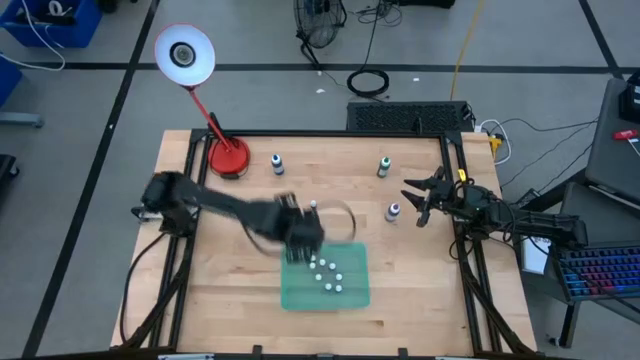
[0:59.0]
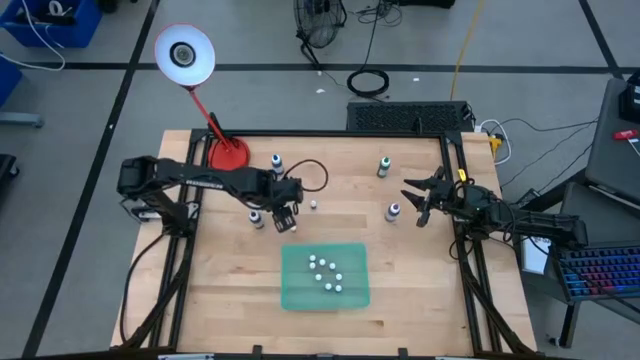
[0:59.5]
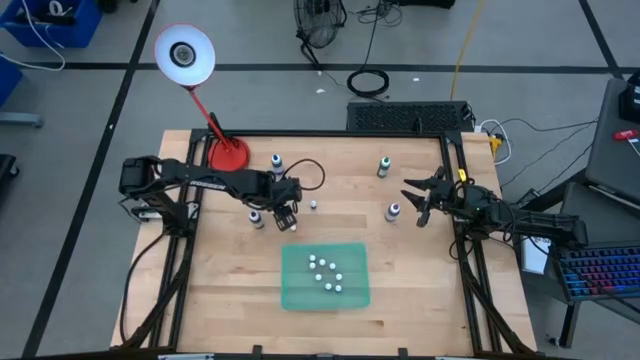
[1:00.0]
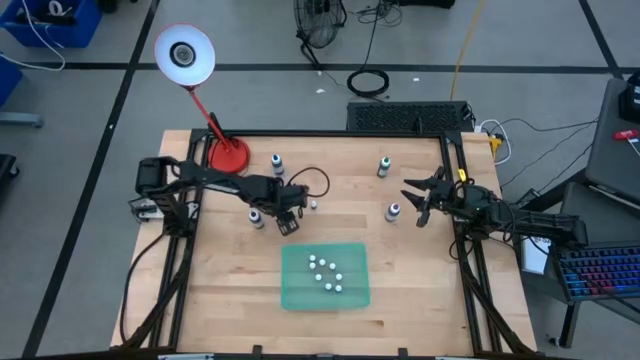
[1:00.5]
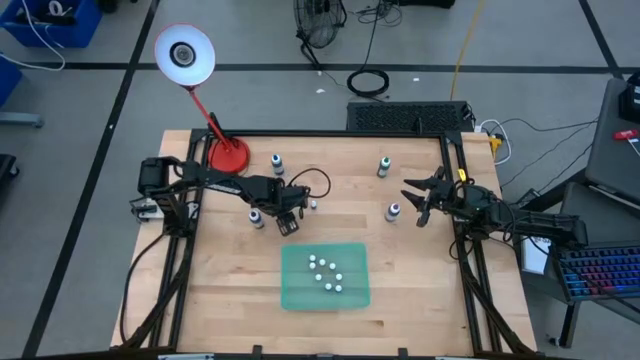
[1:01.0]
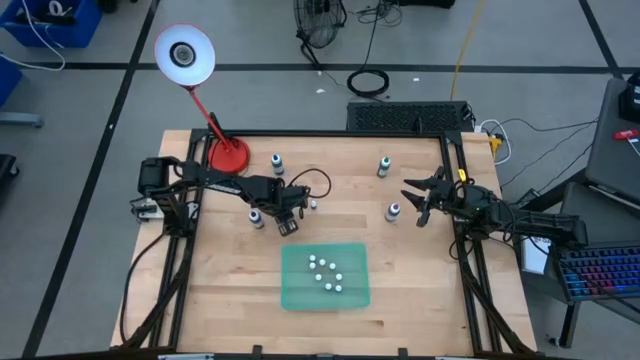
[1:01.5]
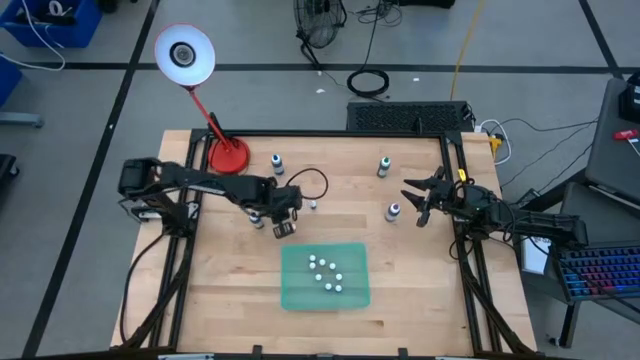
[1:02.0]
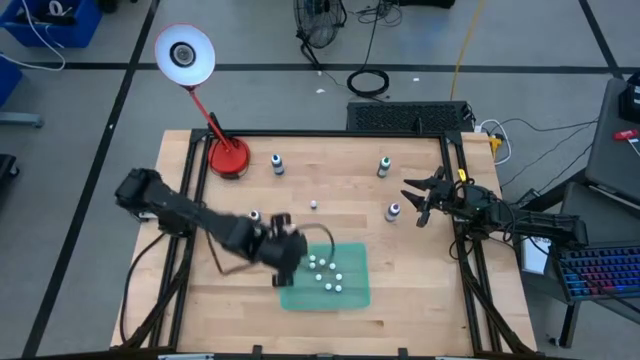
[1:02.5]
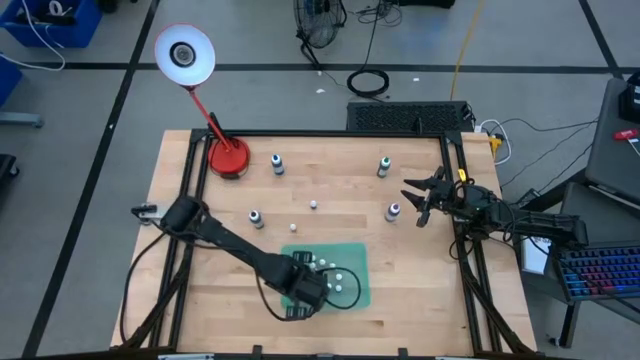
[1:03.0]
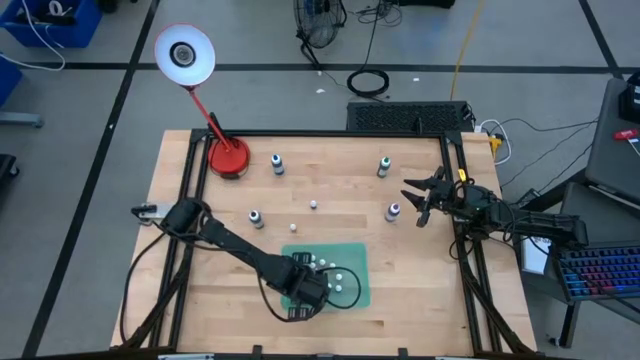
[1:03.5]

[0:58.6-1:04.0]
Task: Pick & Place food coloring
Put the small black food coloring bottle into the blue bin

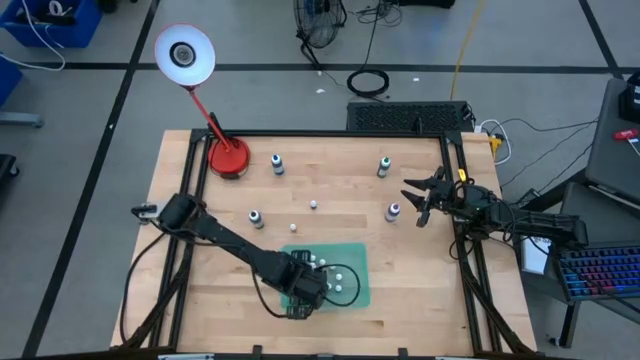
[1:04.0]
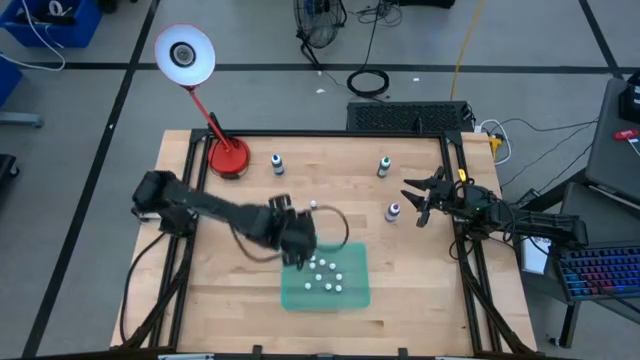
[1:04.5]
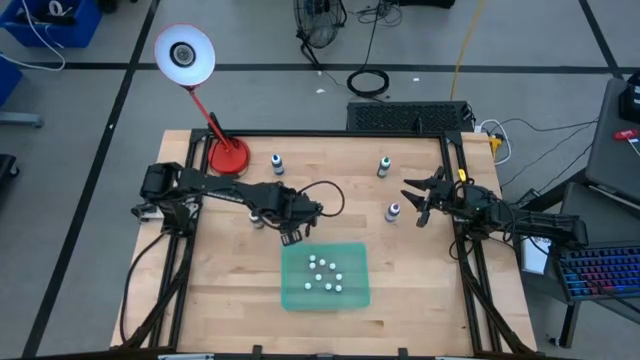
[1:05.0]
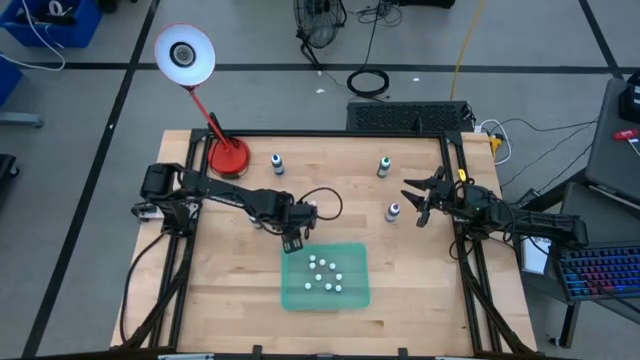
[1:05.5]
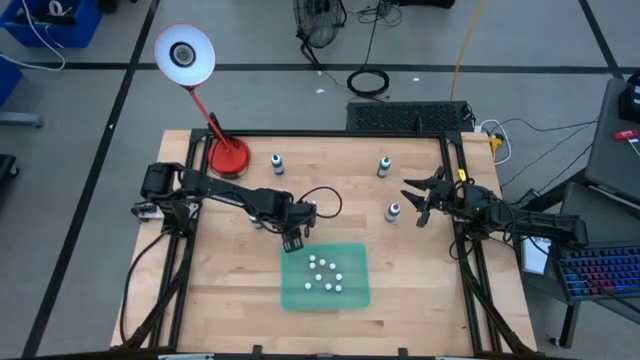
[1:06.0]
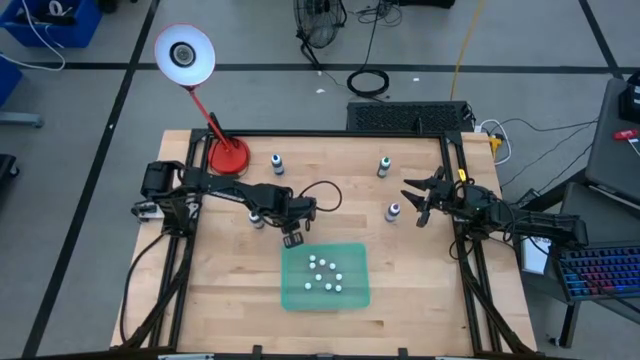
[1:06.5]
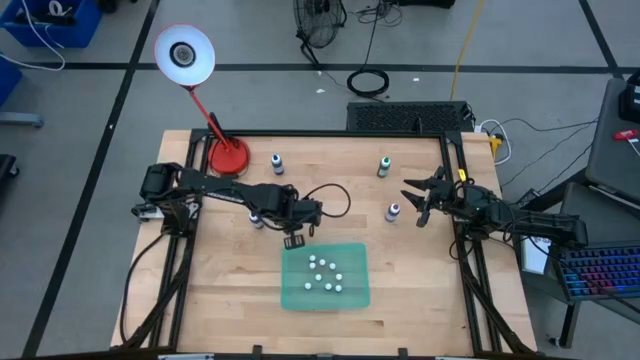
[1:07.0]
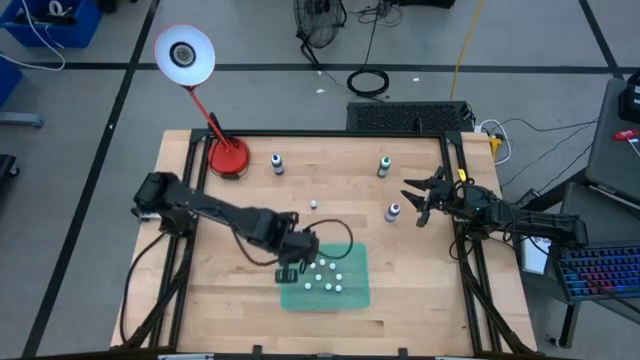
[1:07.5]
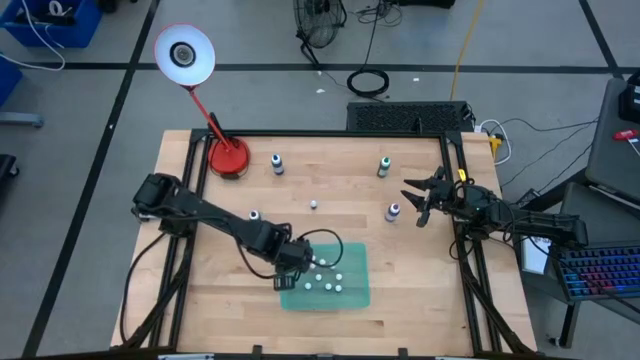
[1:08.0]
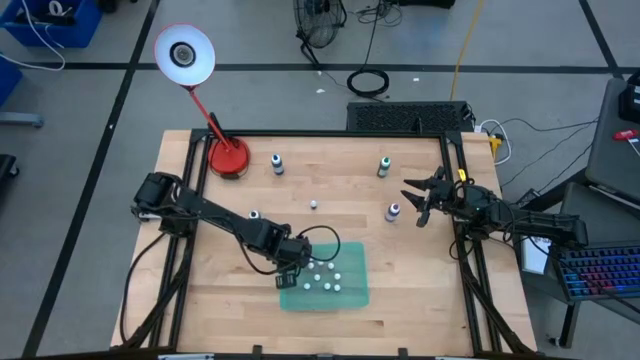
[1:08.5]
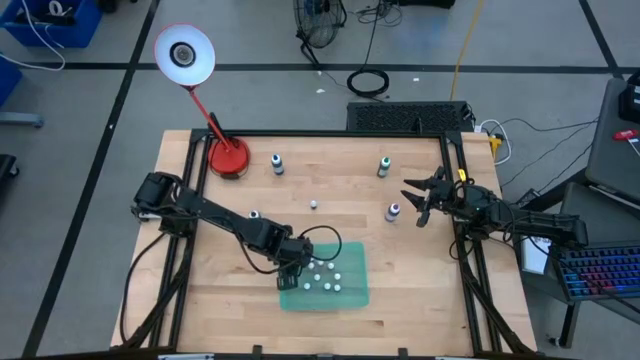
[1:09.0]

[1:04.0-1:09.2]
Put the small yellow food coloring bottle into the blue bin

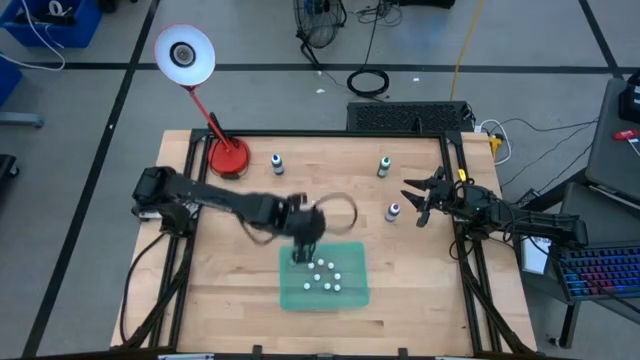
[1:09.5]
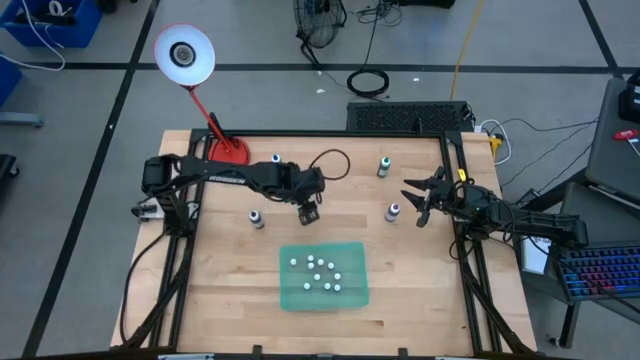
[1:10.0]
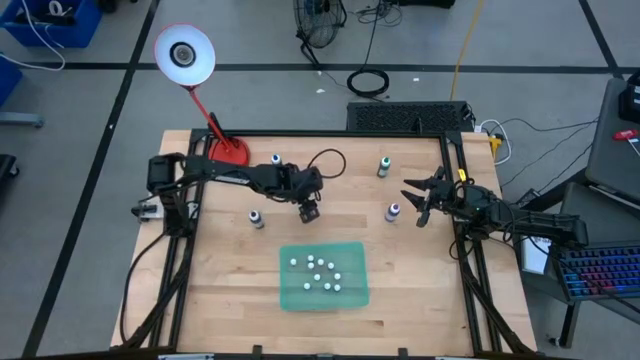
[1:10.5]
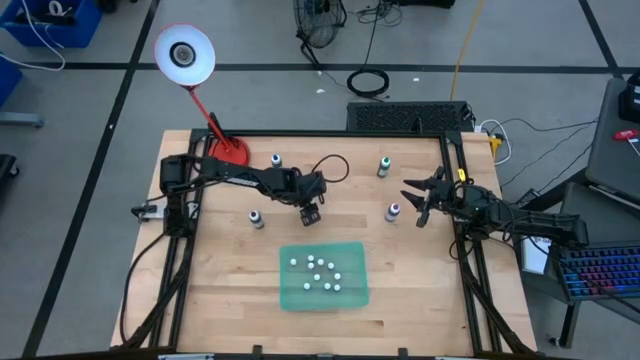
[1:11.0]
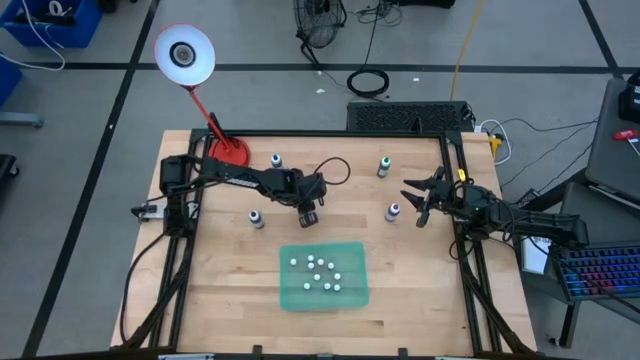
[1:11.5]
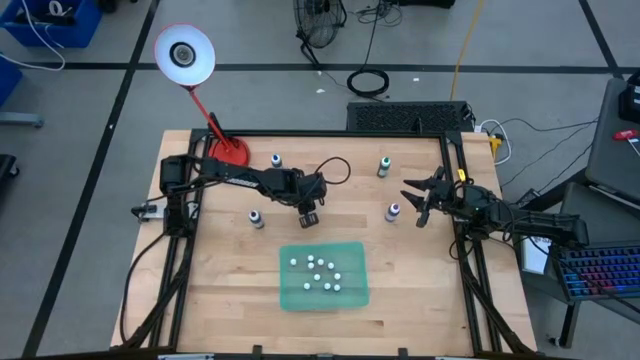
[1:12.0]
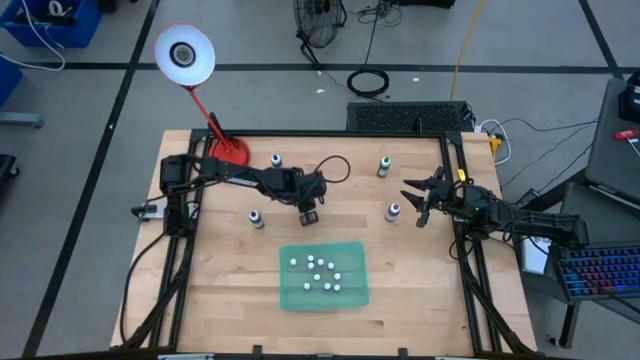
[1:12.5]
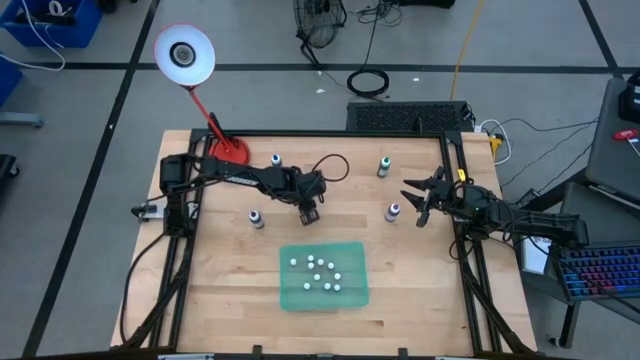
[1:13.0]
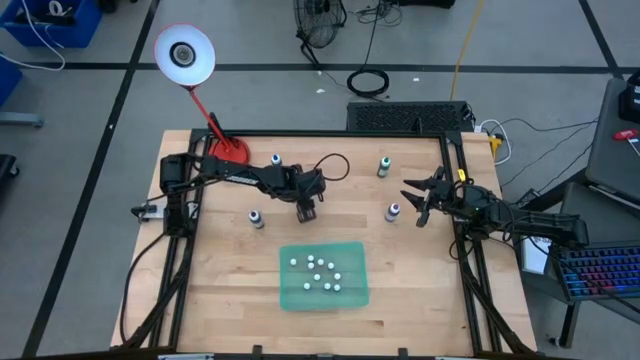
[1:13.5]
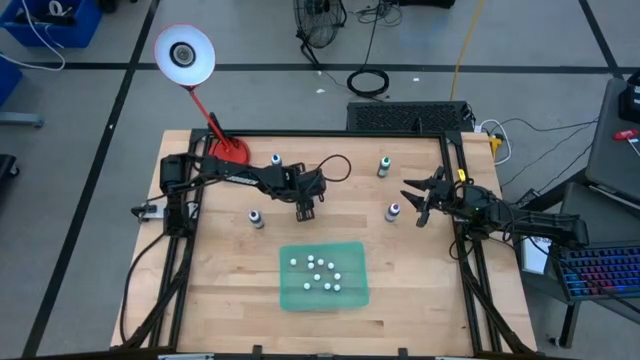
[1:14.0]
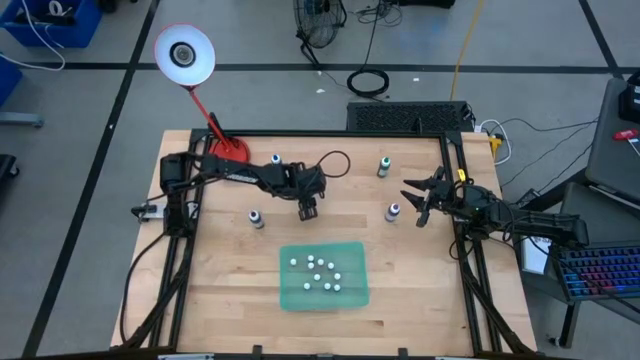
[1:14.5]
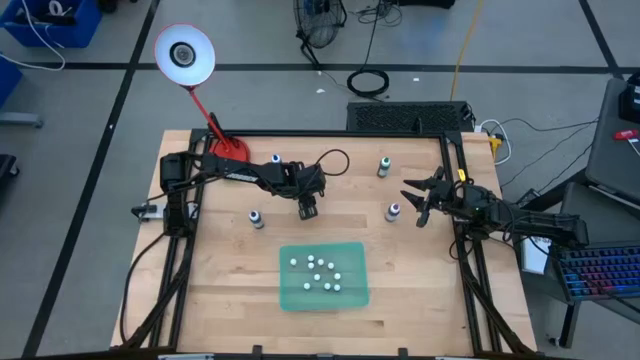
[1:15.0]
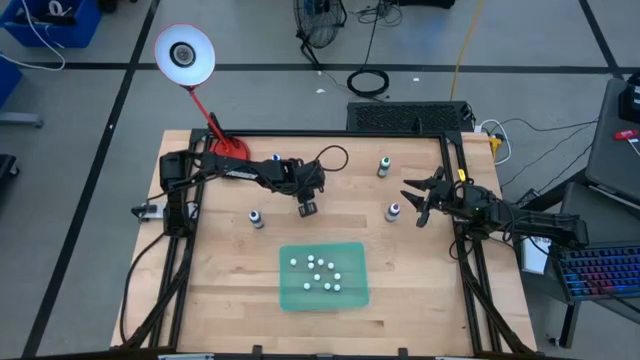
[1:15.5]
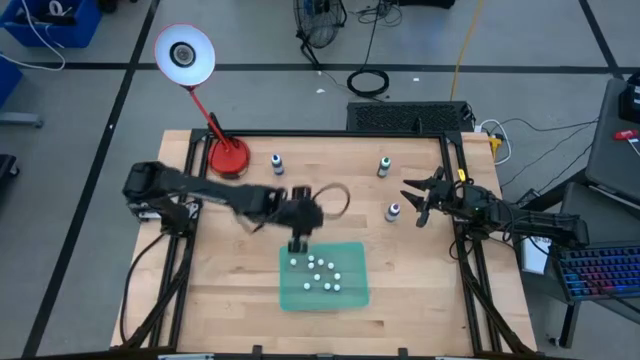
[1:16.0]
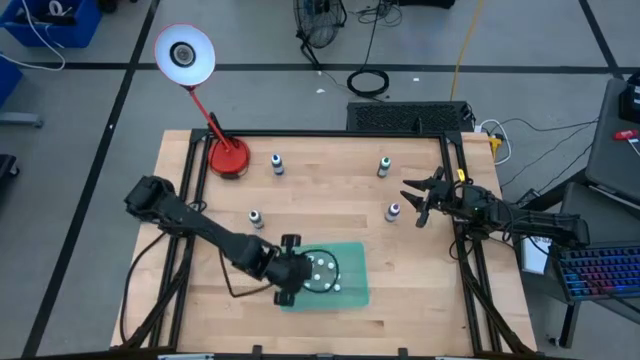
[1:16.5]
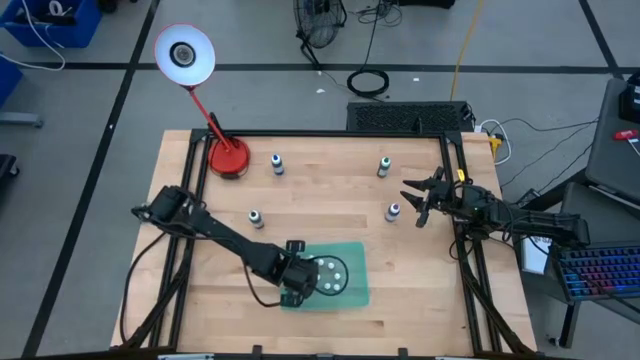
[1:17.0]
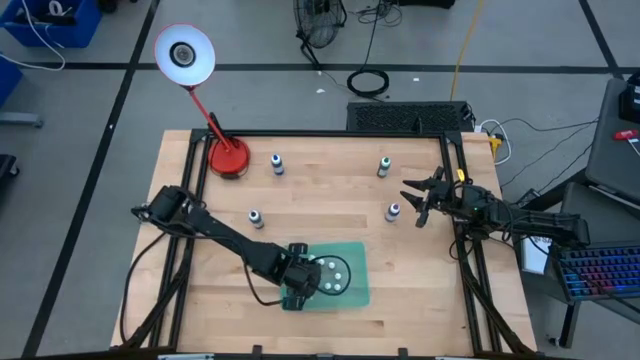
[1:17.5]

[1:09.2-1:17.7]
Put the small purple food coloring bottle into the blue bin

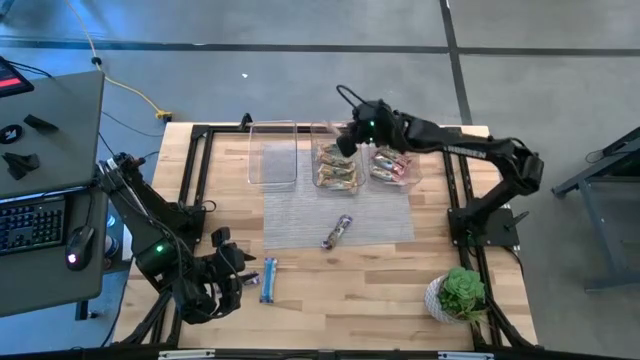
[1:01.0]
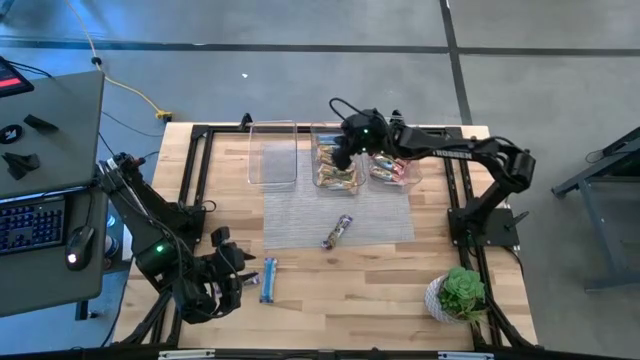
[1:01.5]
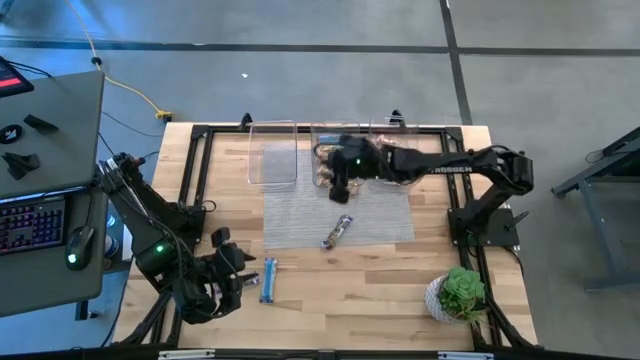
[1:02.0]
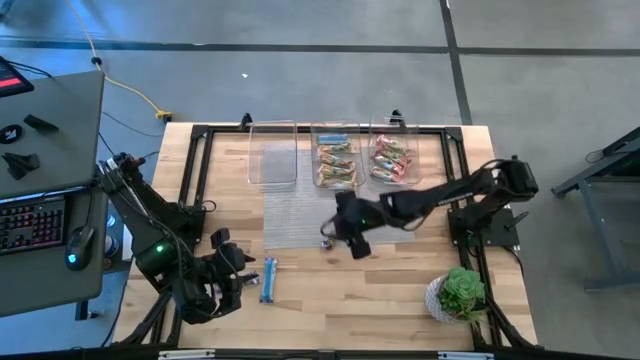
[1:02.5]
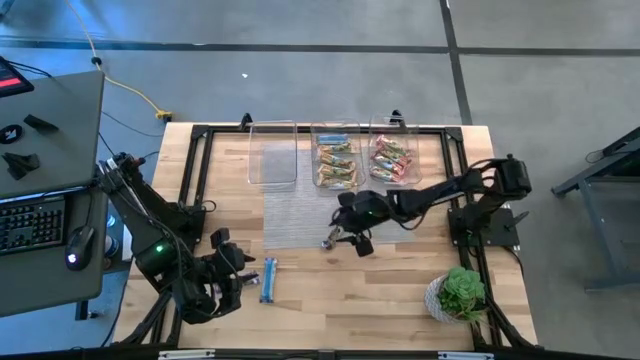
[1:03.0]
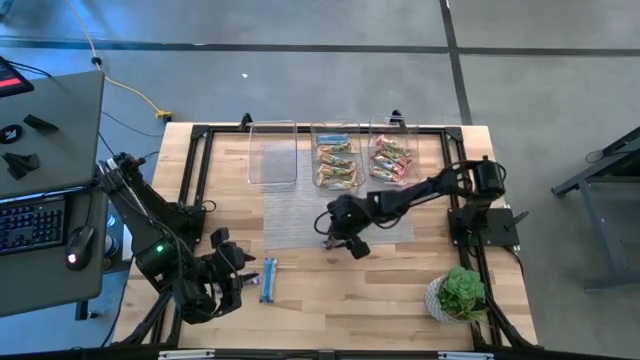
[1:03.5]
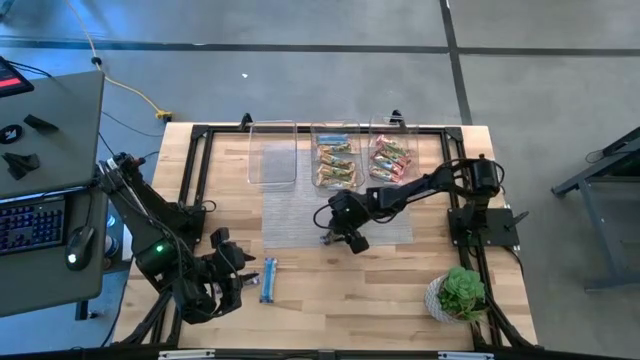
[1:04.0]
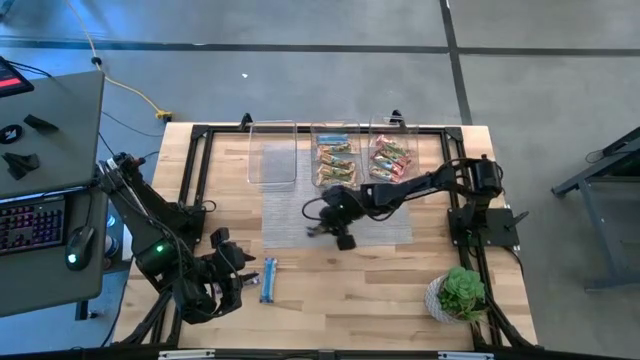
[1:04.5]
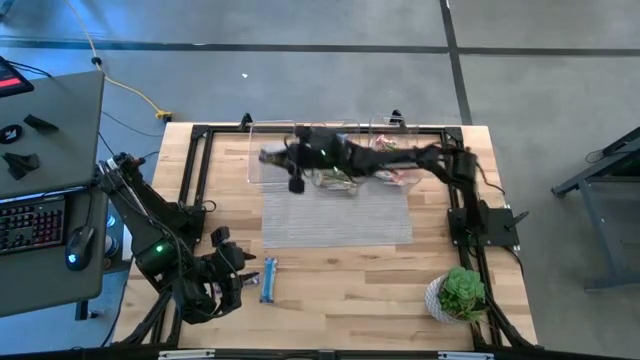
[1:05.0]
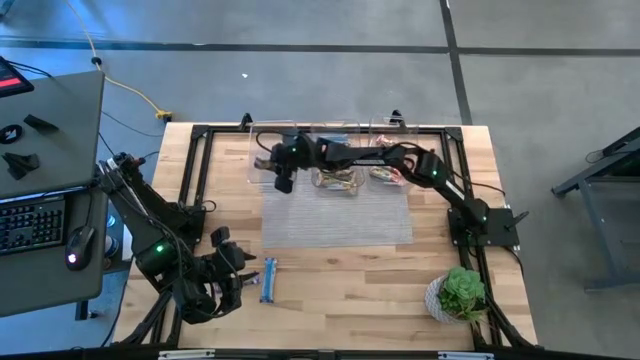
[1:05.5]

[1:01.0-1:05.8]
Task: Pick and place Granola Bars by type
Put the blue granola bar into the left transparent bin
